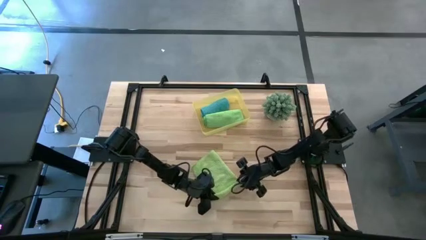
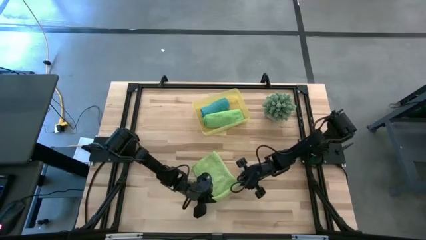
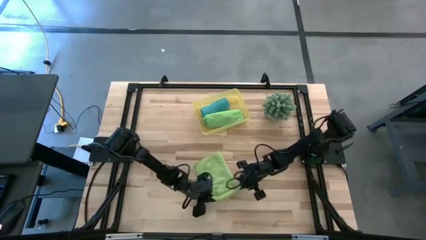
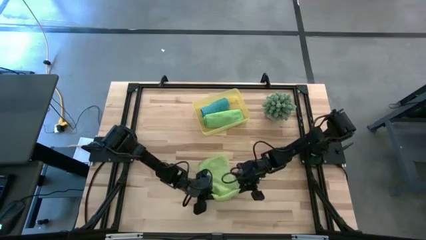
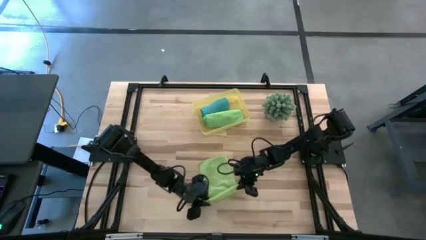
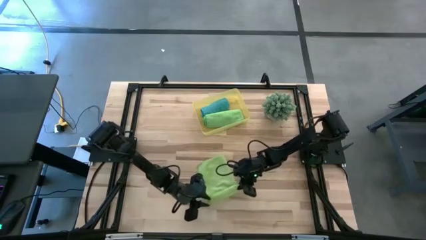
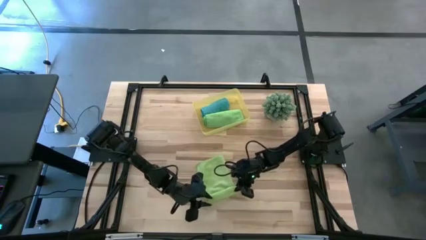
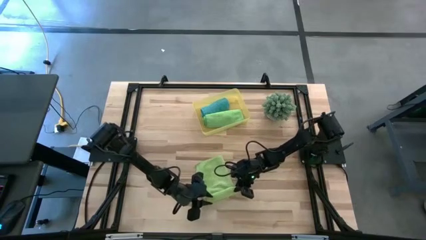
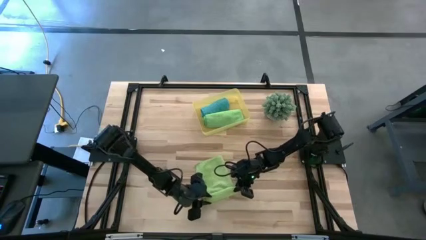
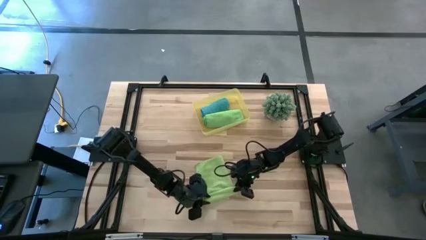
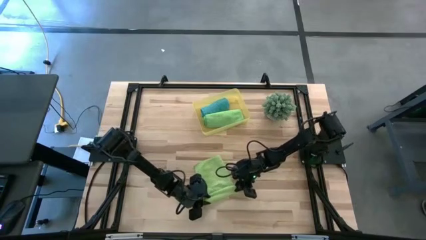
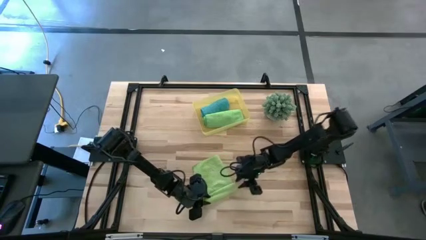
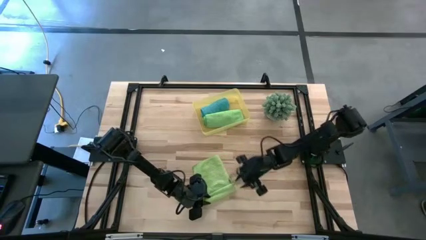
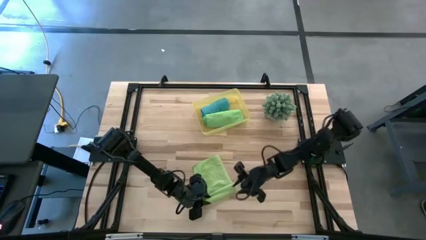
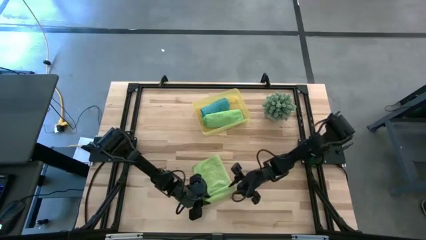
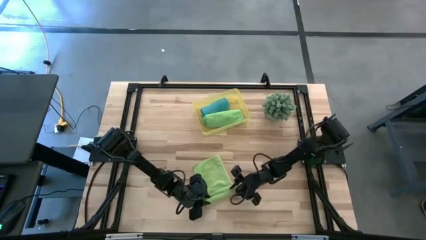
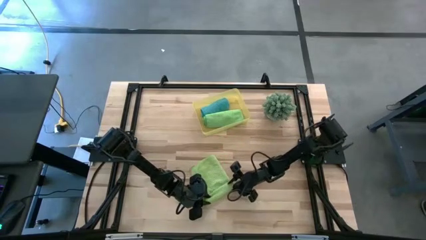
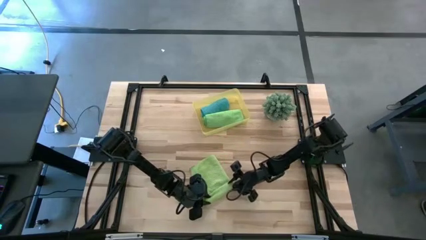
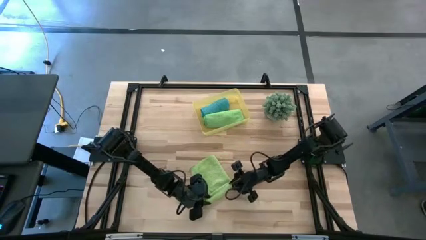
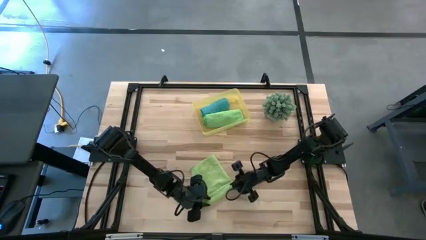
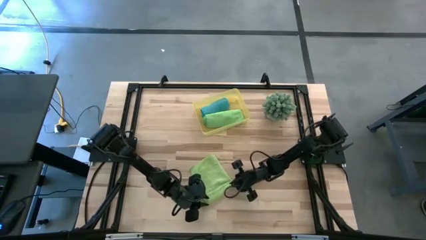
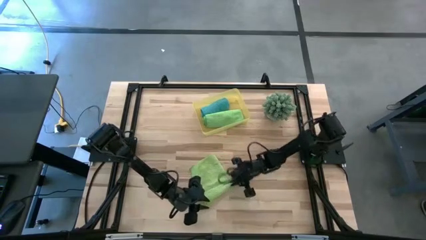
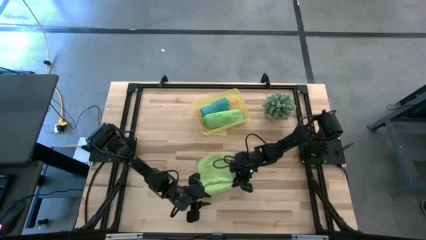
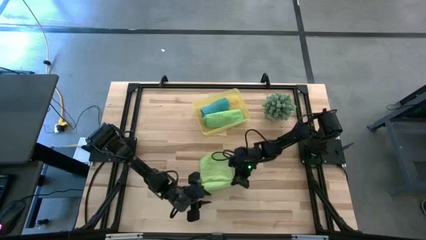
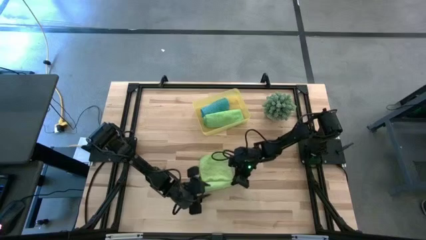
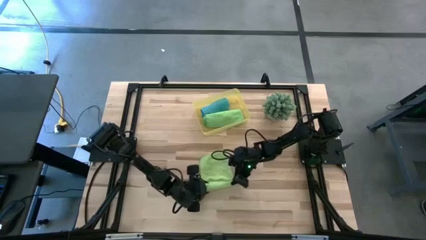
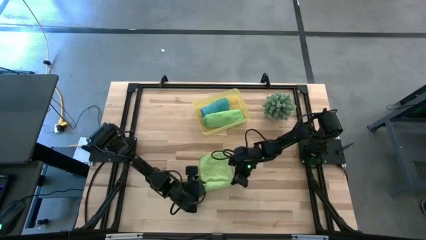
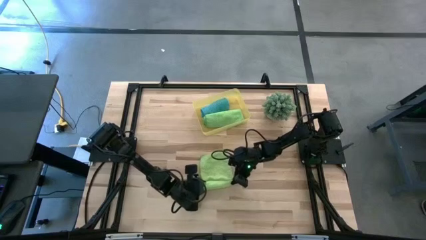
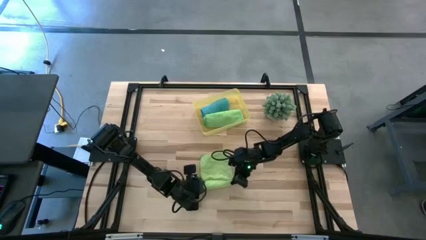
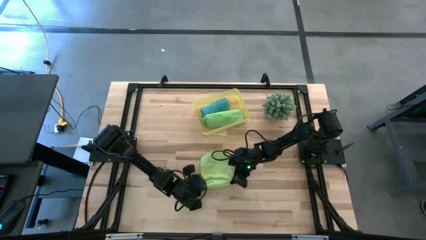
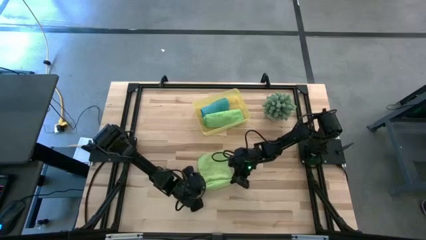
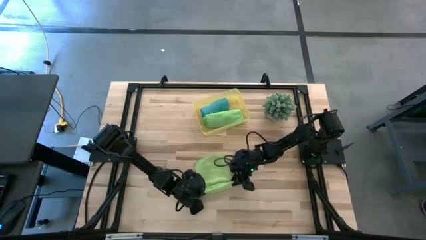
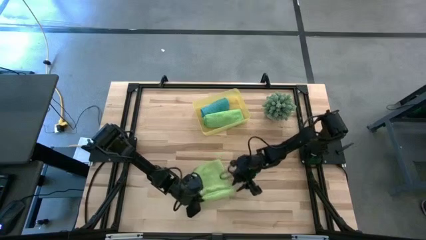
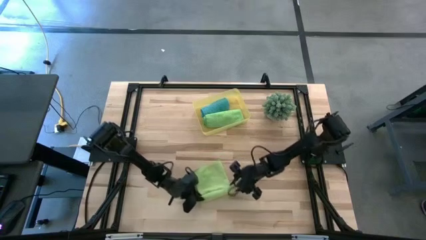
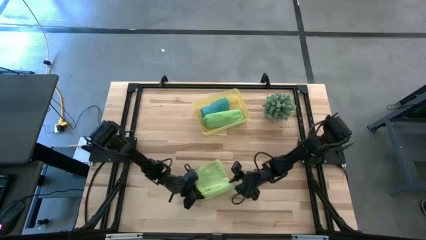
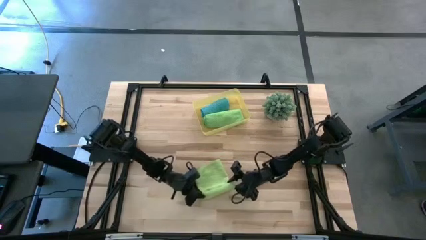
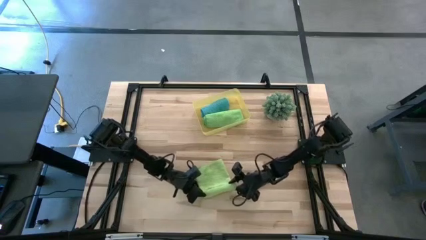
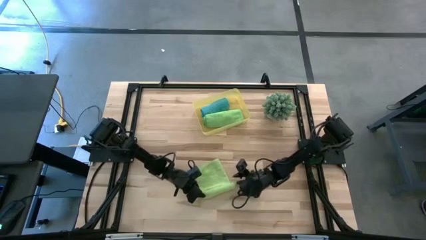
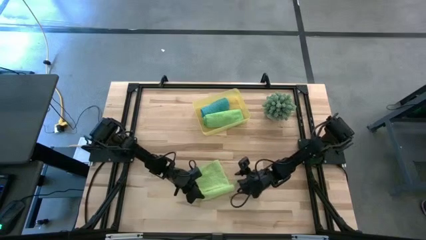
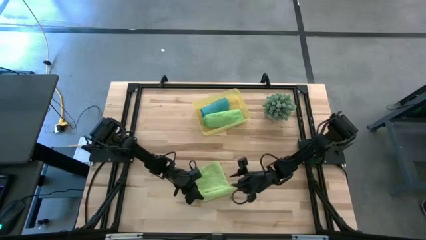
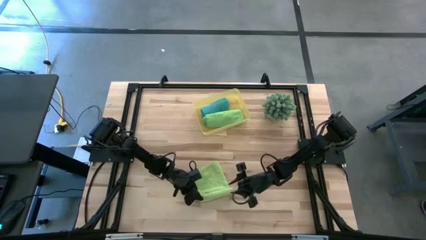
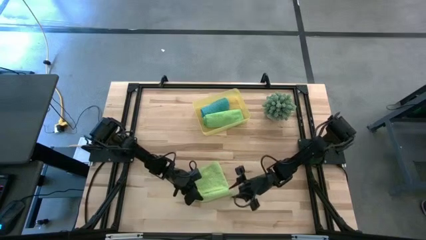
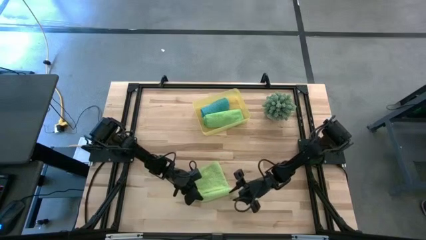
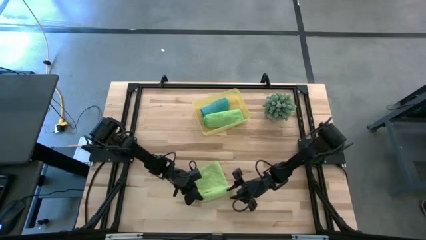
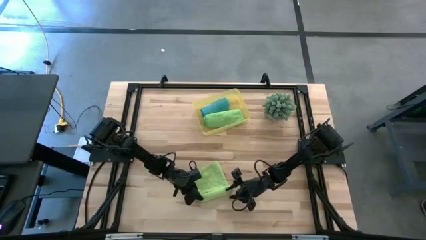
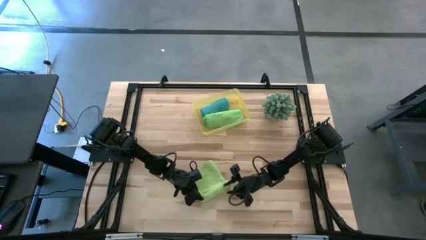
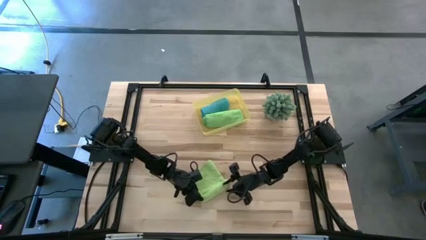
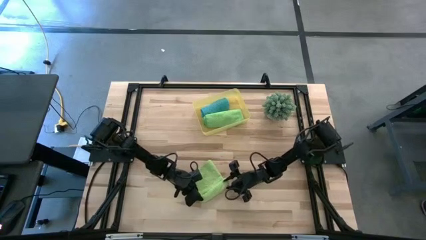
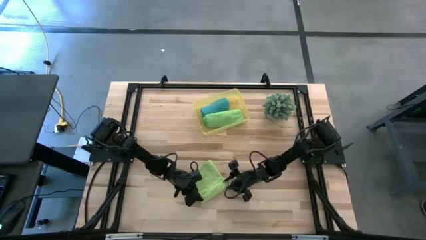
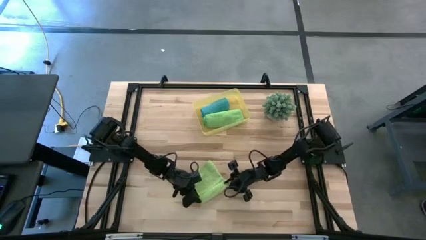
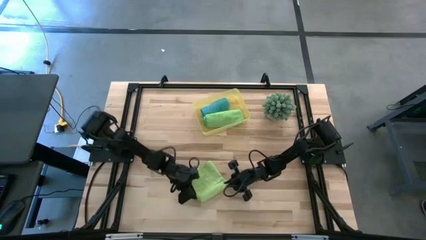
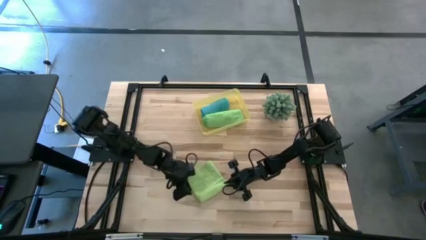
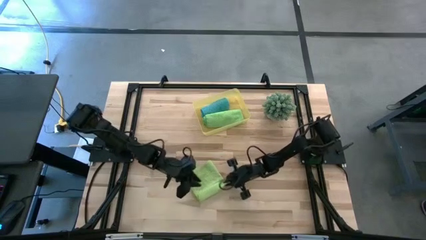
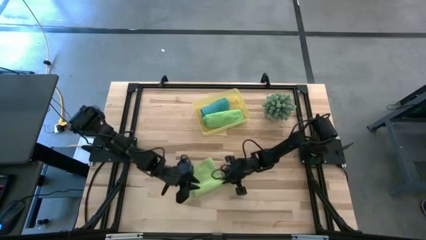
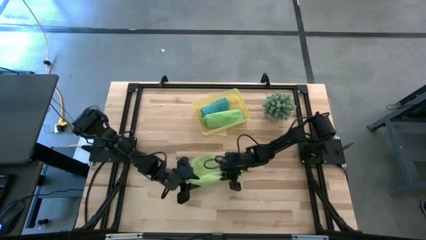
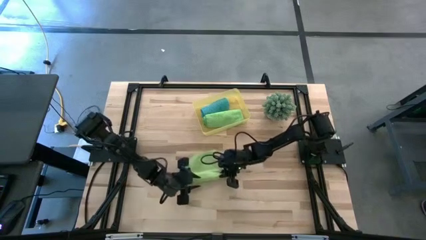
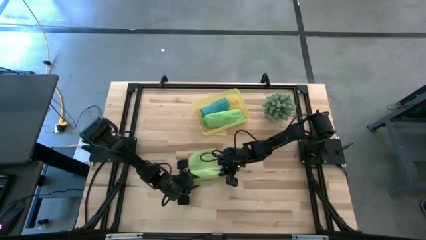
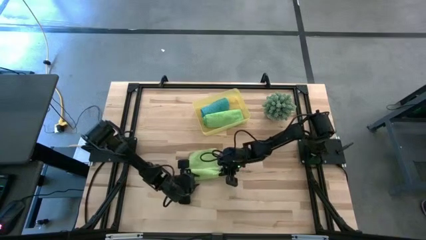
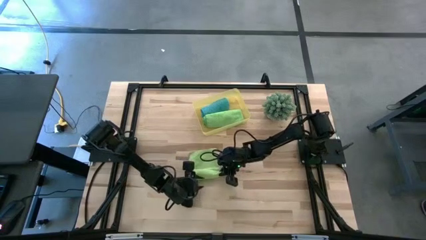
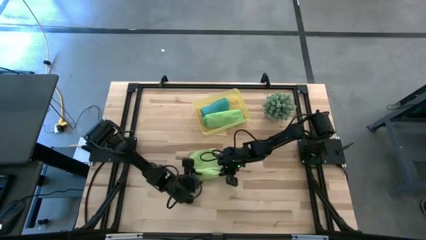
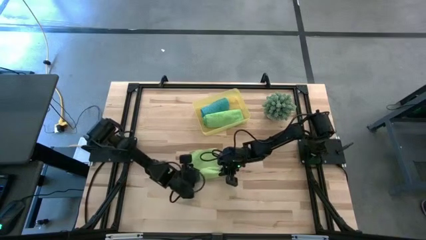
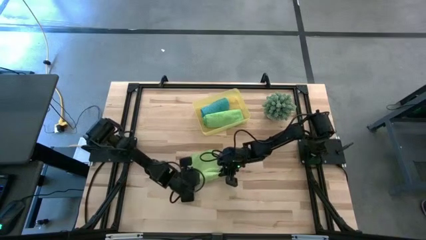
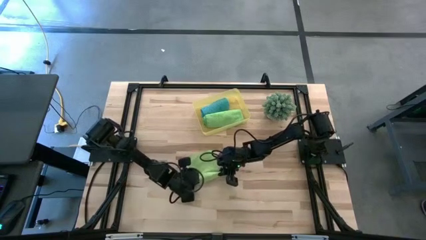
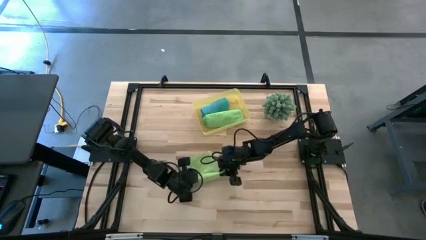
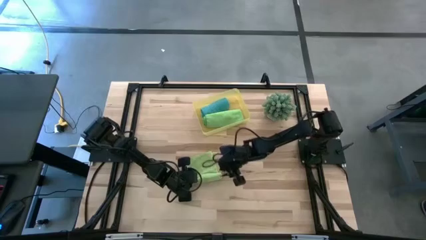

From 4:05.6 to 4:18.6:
Task: Roll microfiber towels into tight, uniform cylinder then place into a basket
Roll the light green microfiber cloth

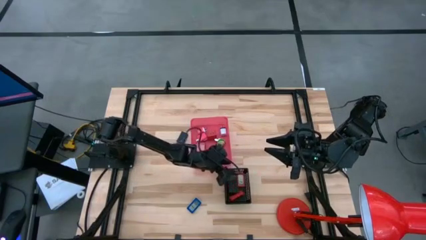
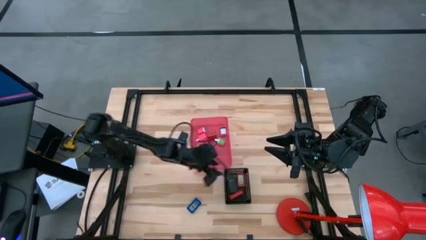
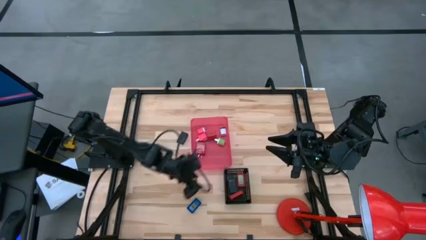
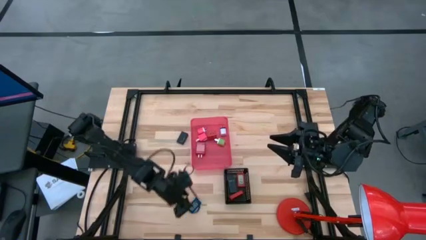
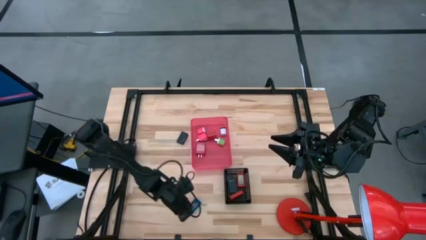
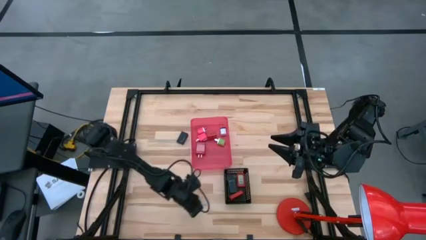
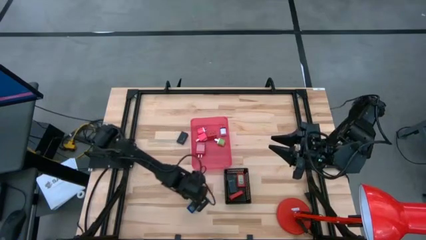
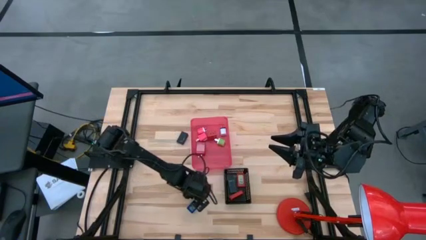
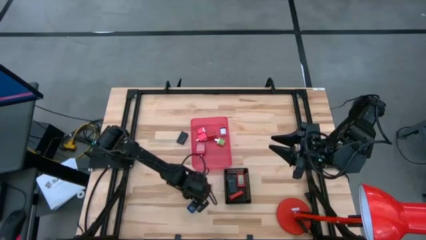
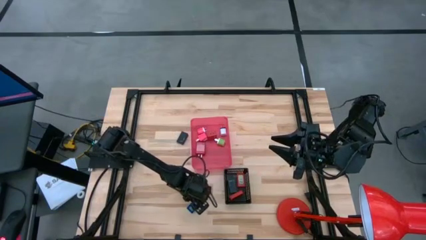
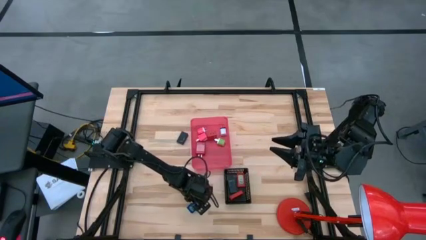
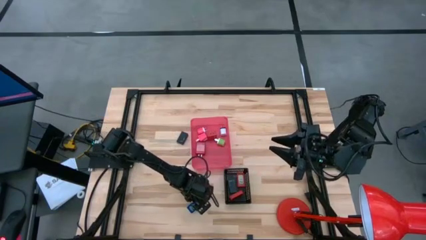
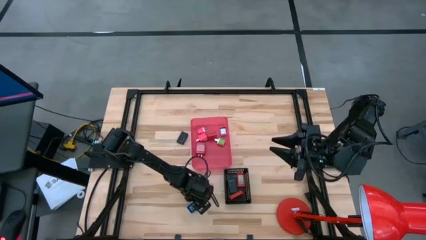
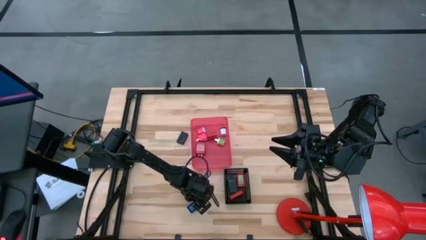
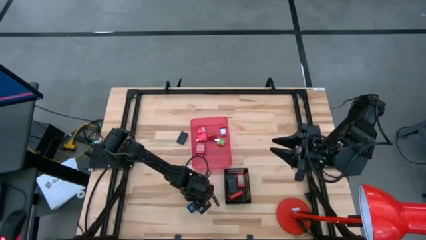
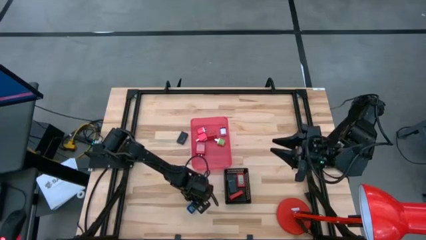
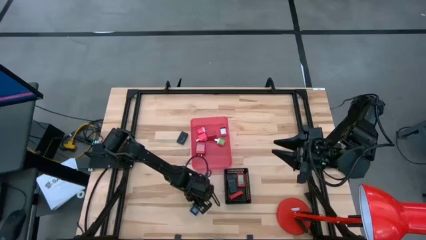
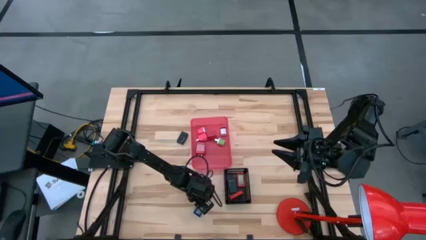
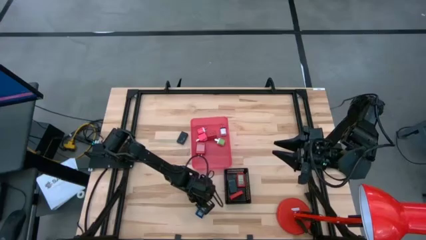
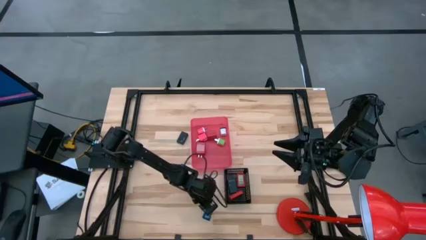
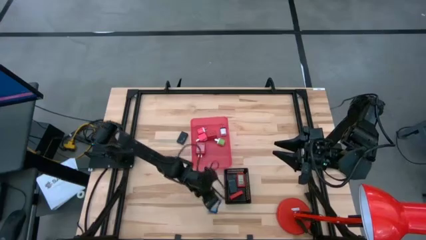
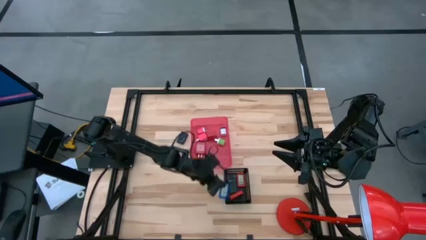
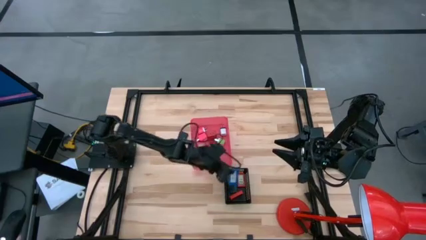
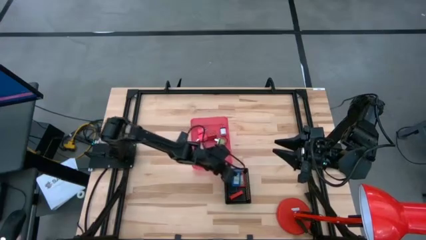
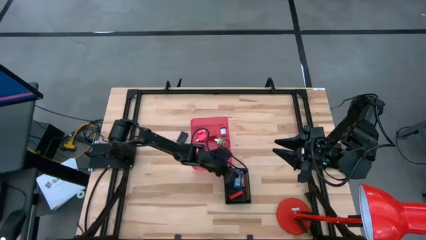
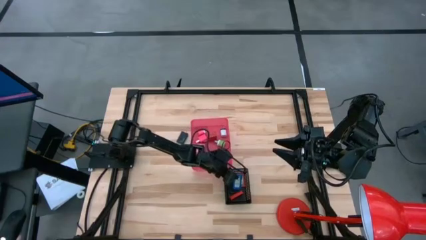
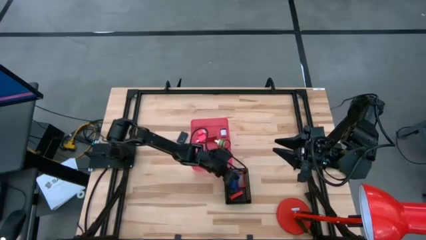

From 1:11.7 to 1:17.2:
Task: Pick & Place Office items
Put the blue digital timer into the black bin
